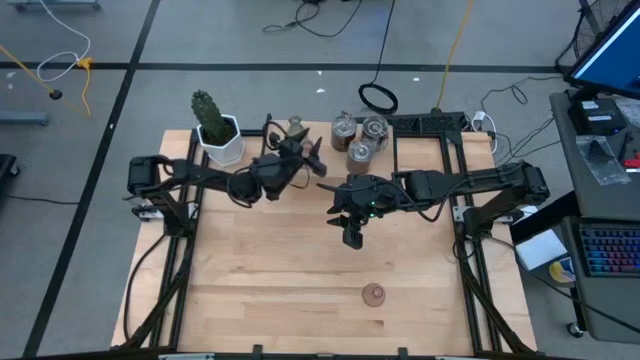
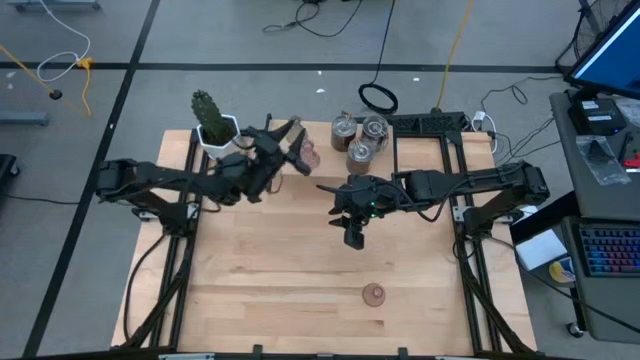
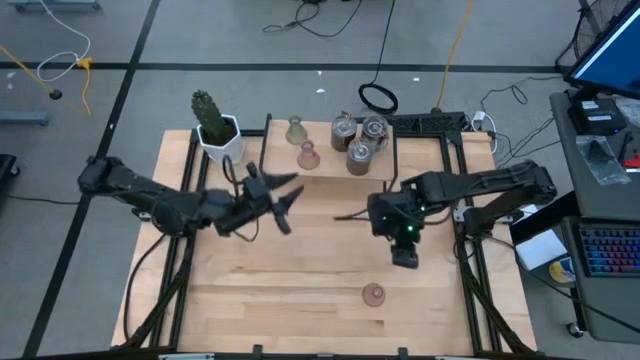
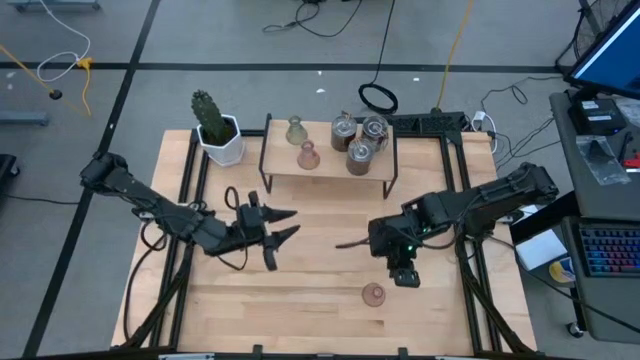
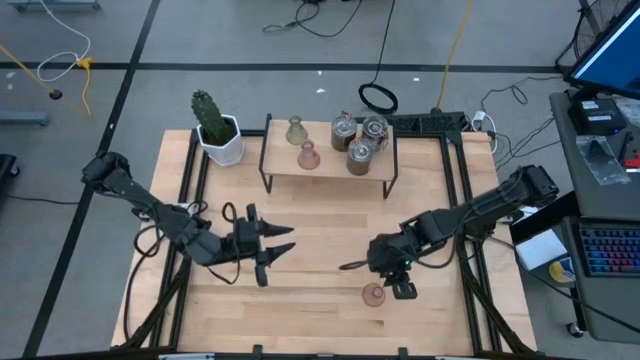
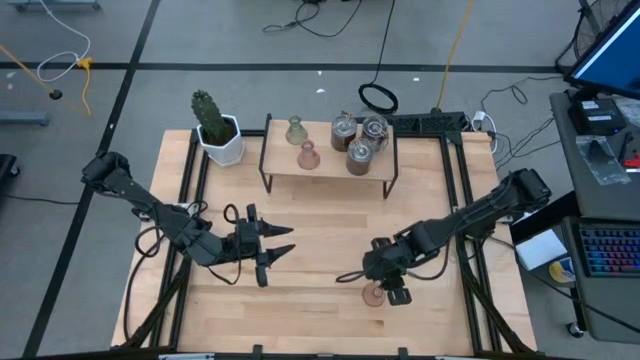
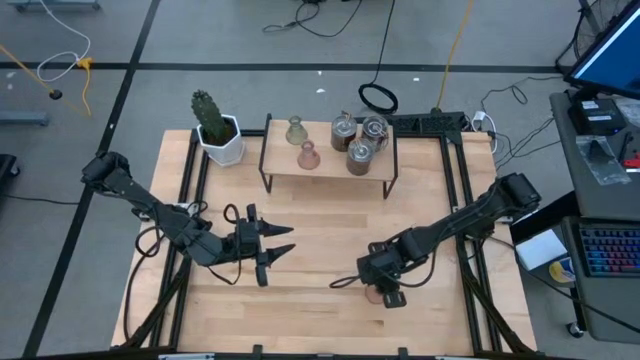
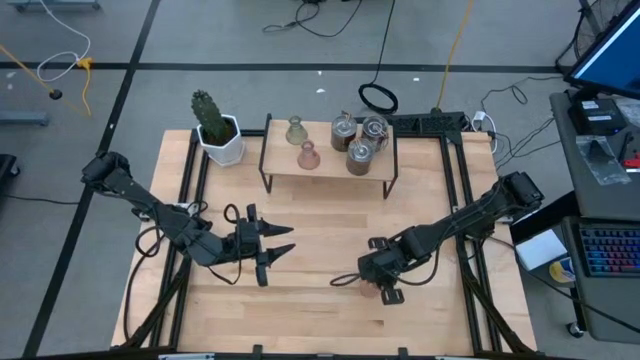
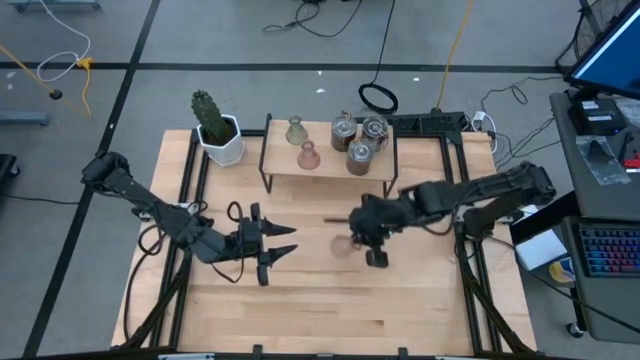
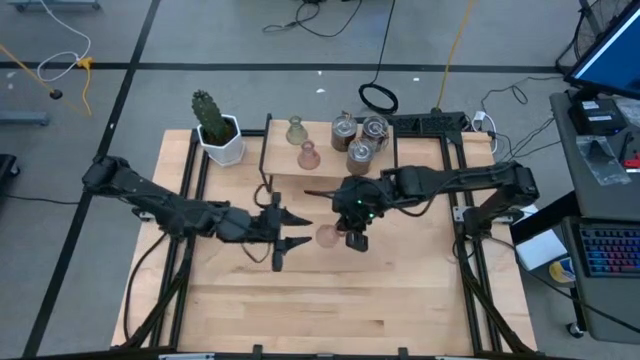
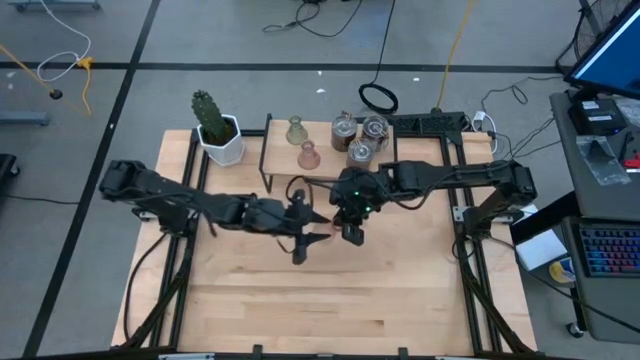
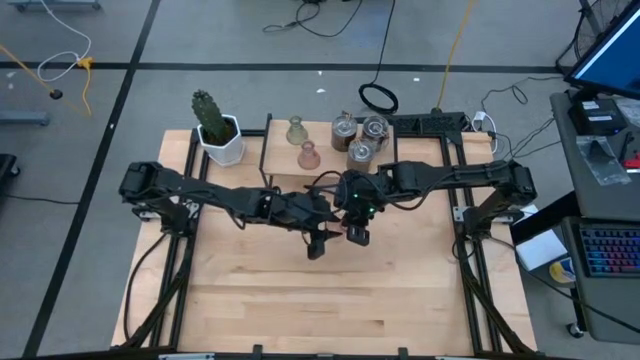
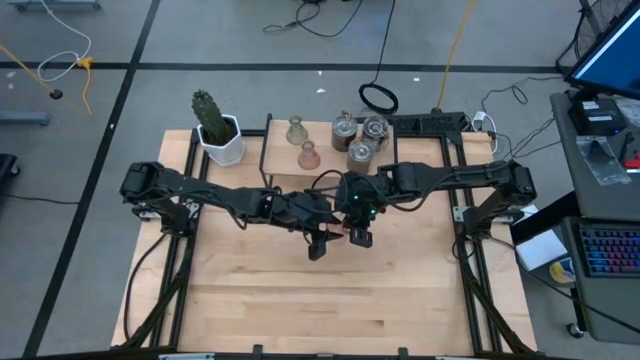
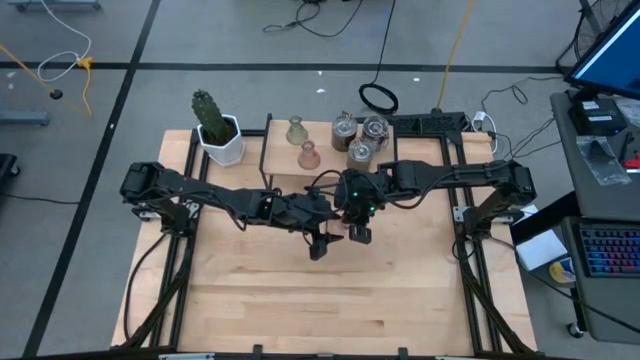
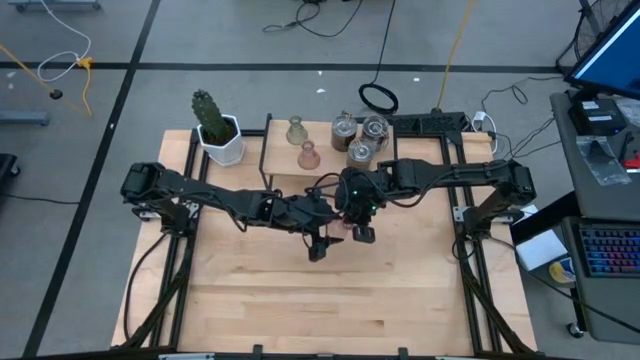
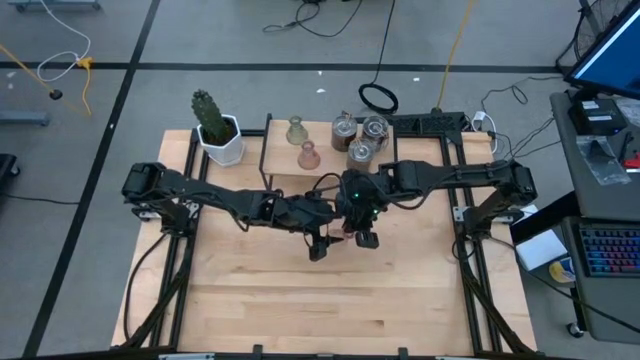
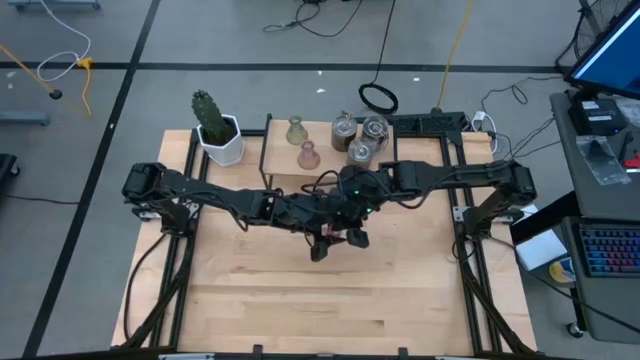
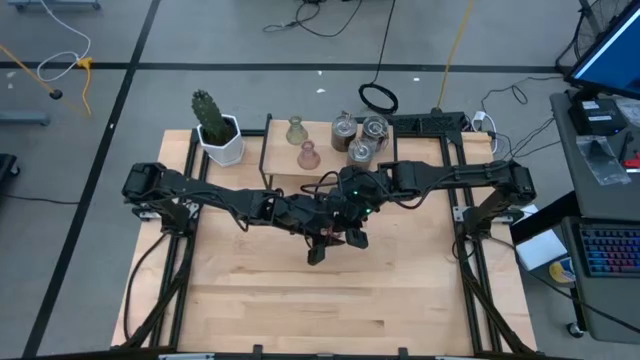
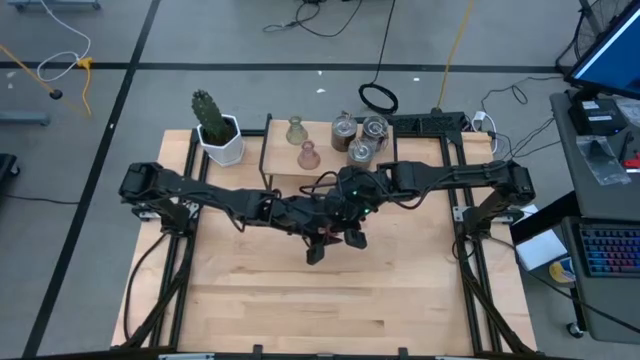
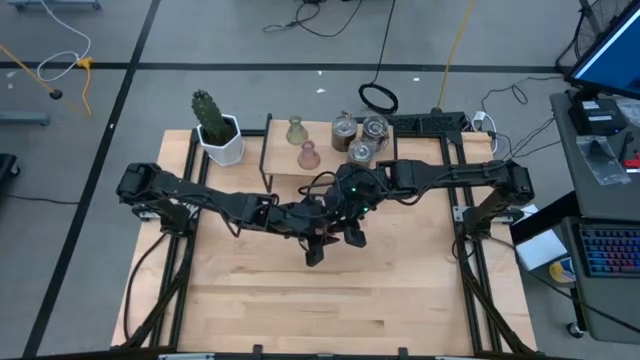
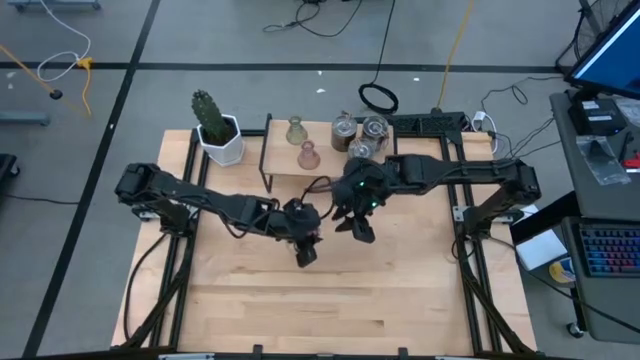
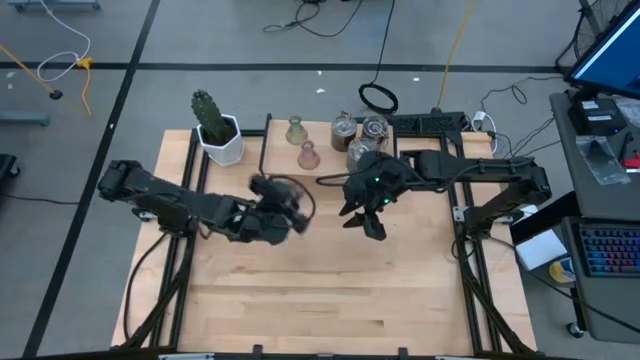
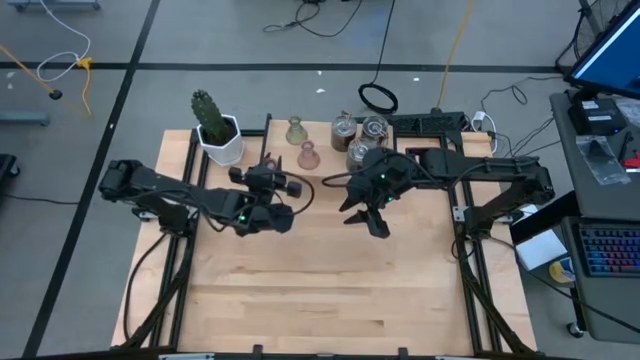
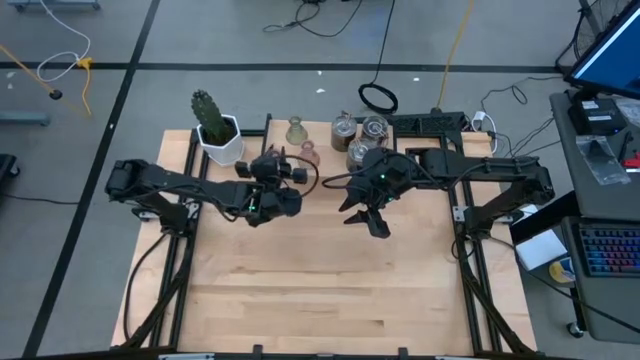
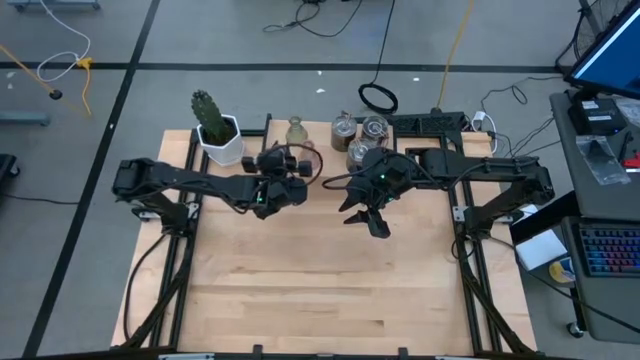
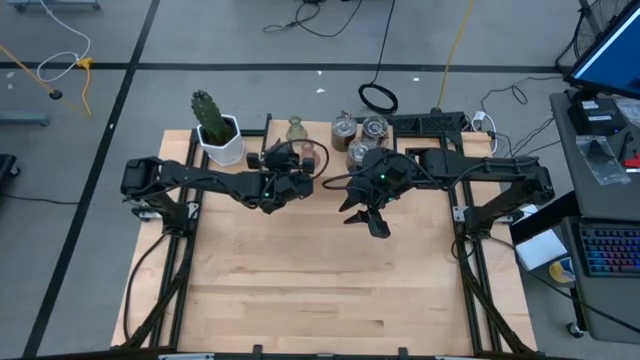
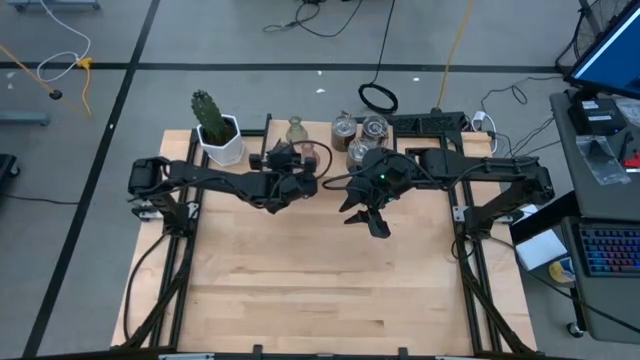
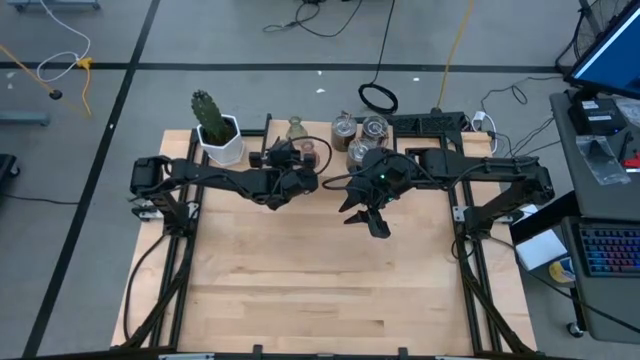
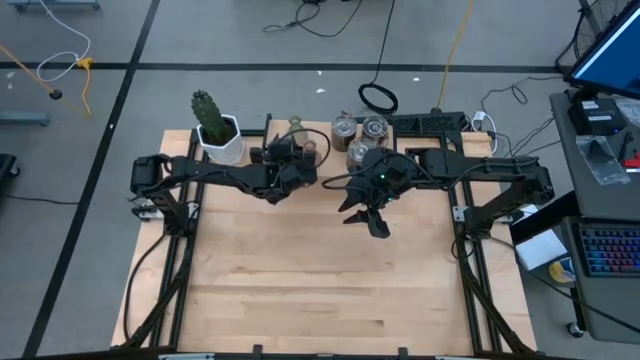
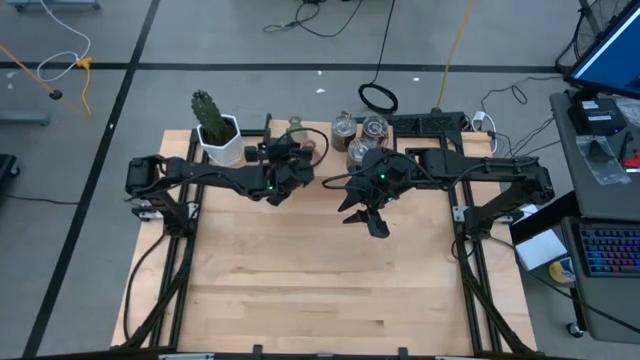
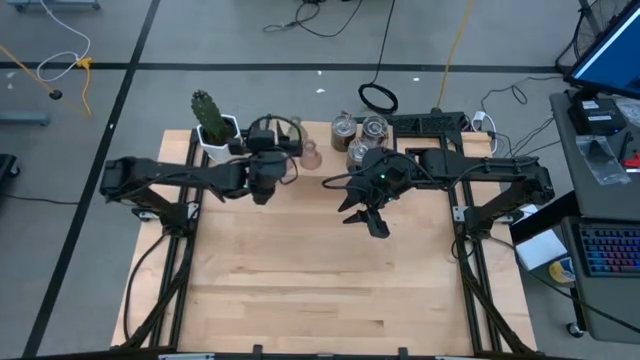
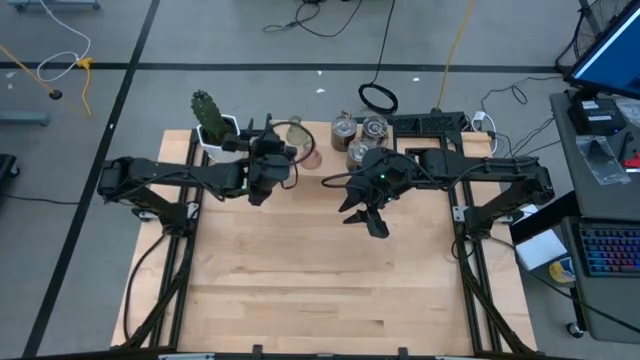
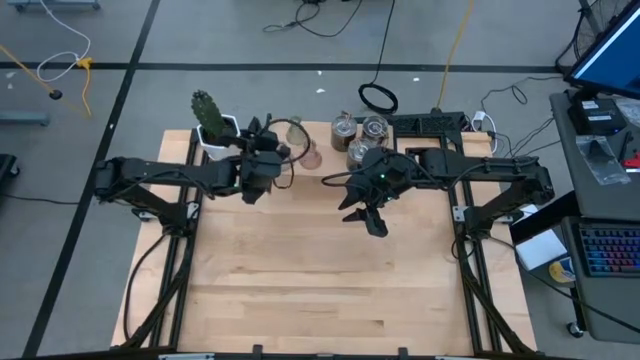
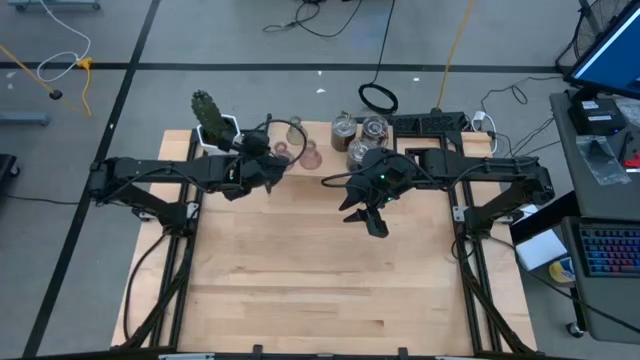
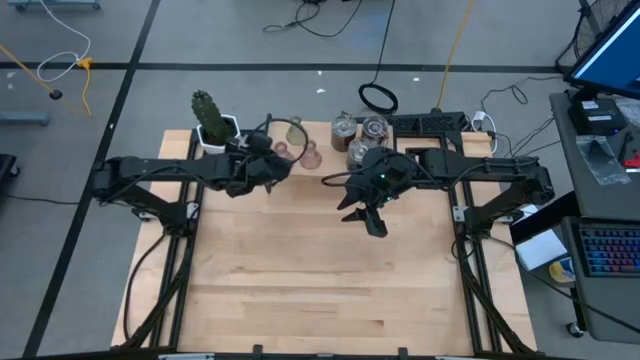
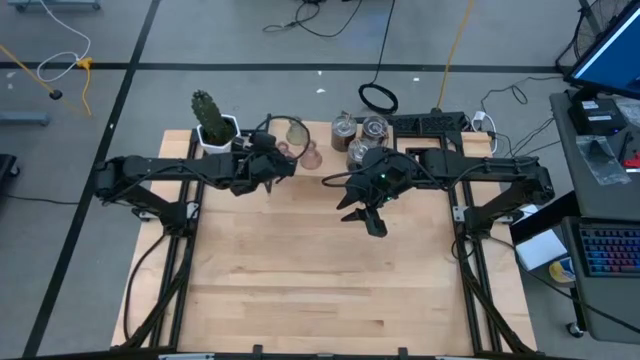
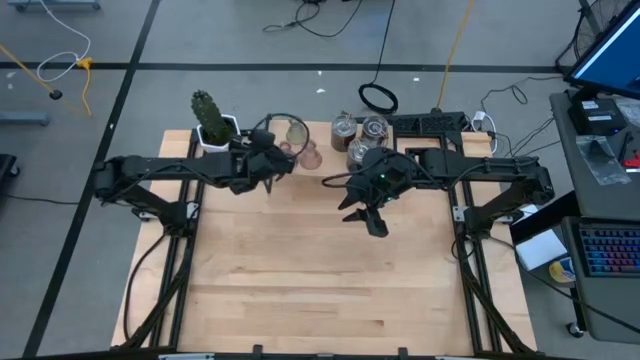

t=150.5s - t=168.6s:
Task: Pick & Place candle stick holders
Put the pink vase candle holder on the shelf

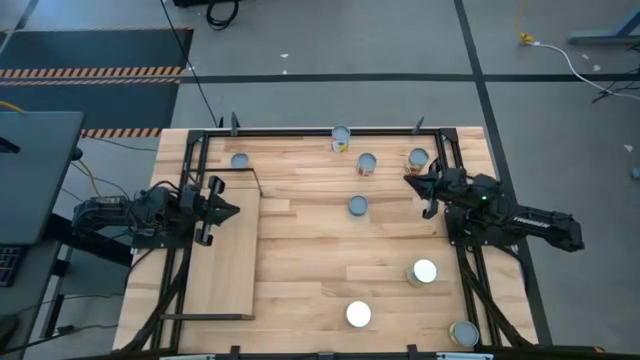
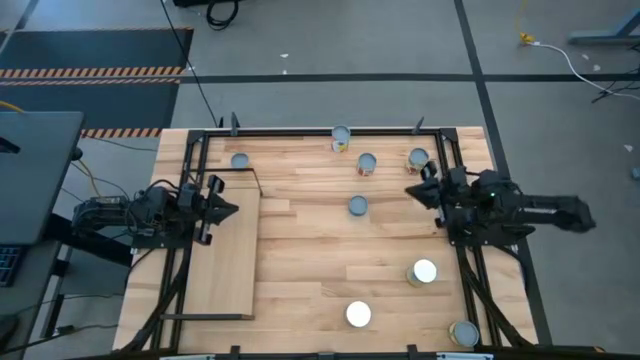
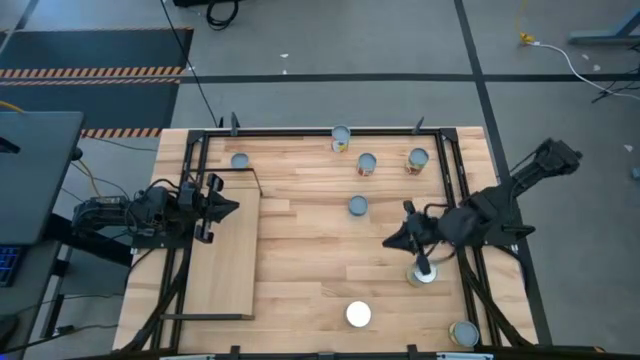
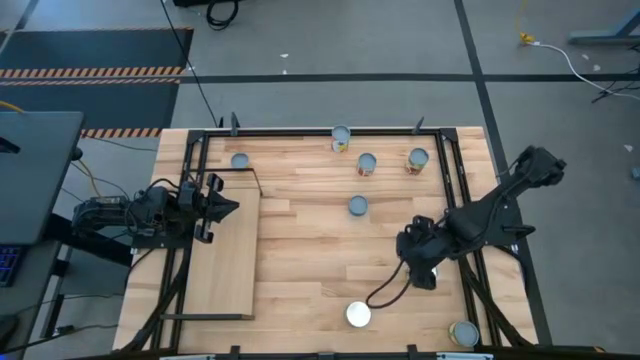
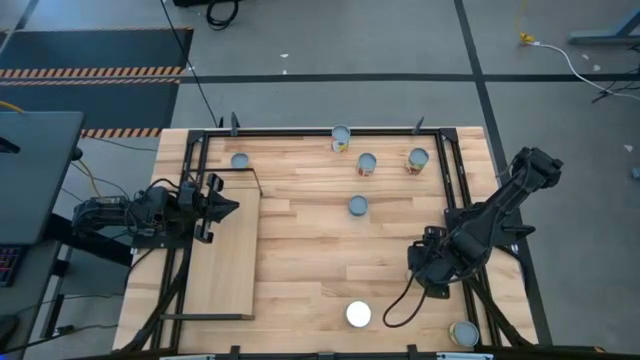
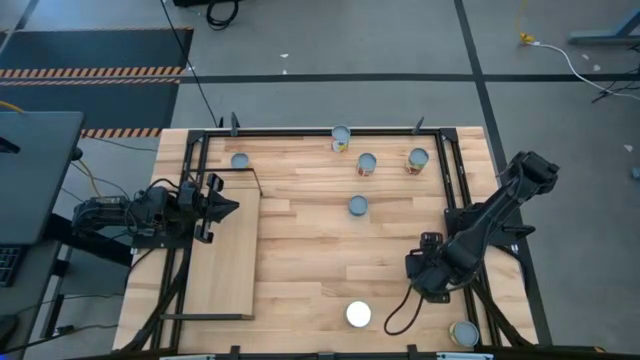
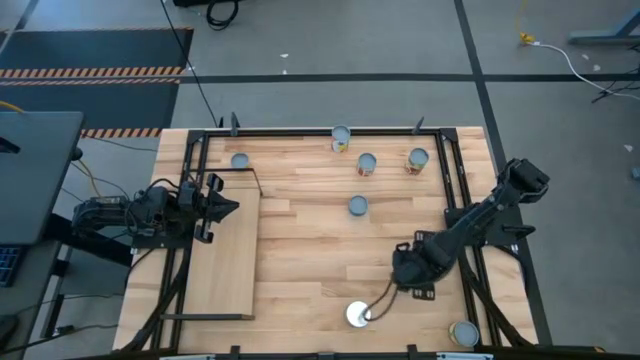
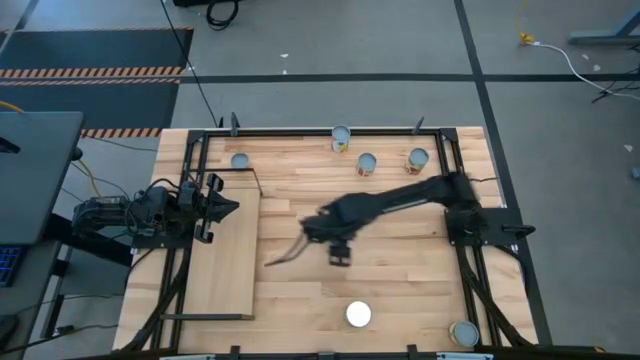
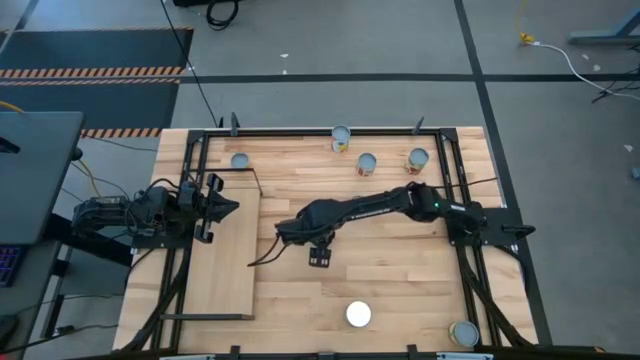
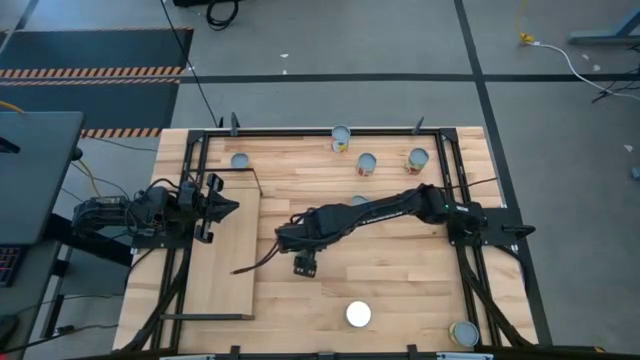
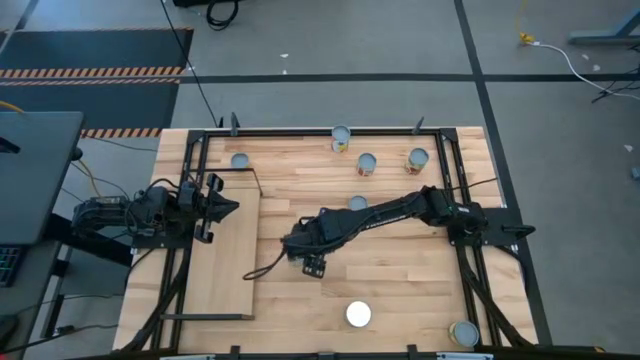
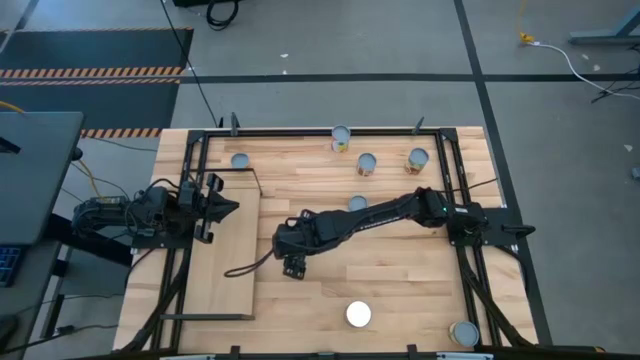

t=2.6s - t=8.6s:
Task: Pick and place cans onto a shelf
Move the canned carrots to the middle of the table
